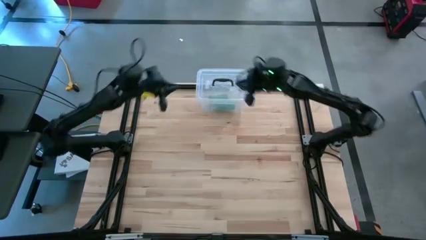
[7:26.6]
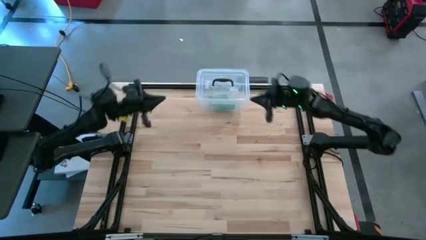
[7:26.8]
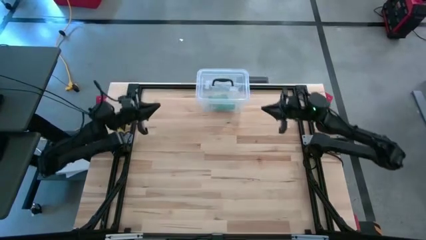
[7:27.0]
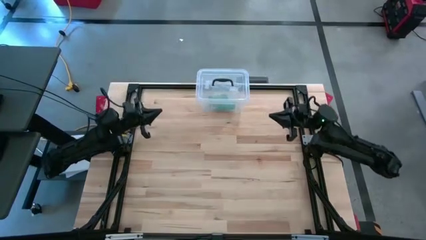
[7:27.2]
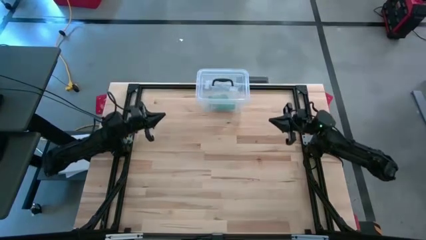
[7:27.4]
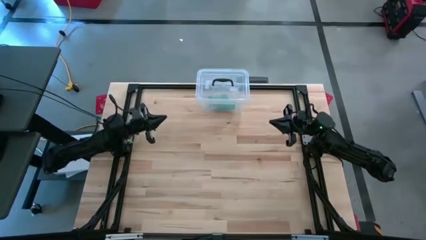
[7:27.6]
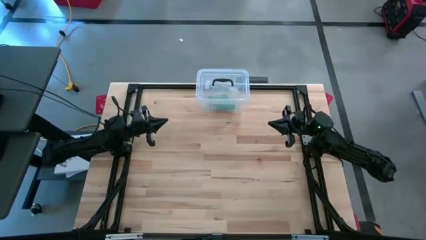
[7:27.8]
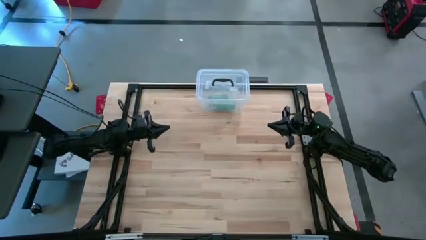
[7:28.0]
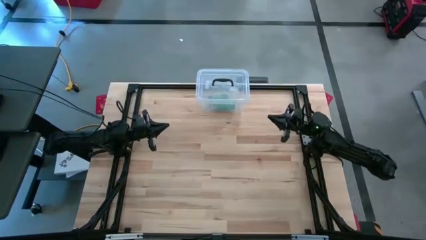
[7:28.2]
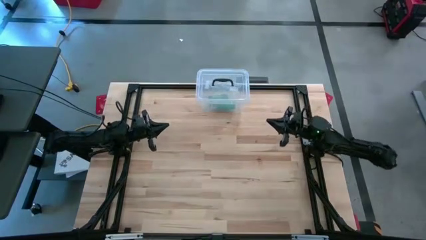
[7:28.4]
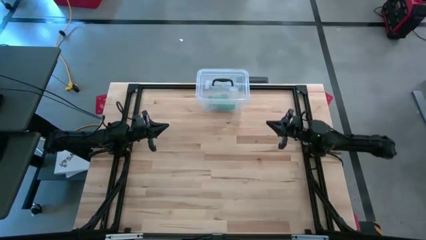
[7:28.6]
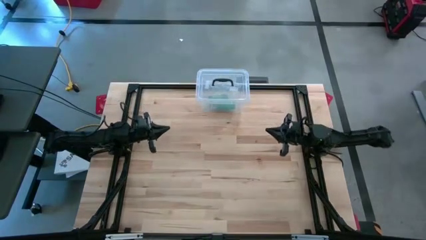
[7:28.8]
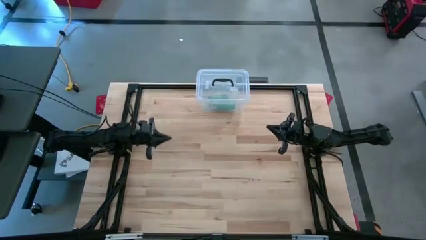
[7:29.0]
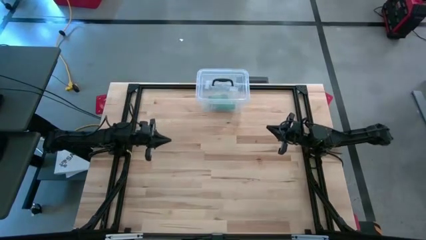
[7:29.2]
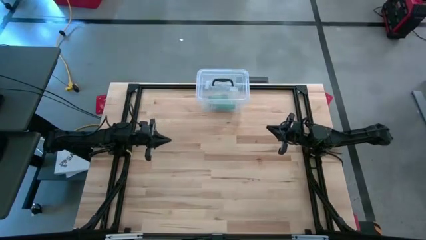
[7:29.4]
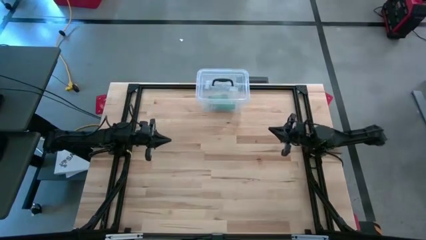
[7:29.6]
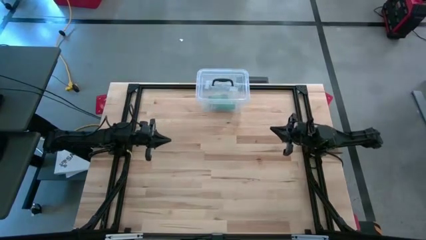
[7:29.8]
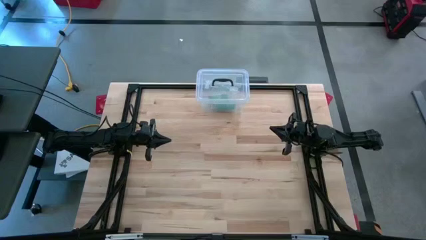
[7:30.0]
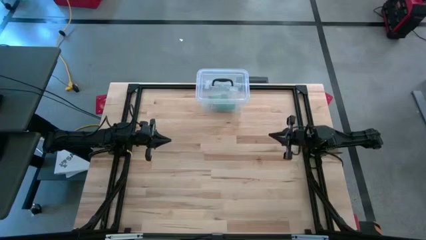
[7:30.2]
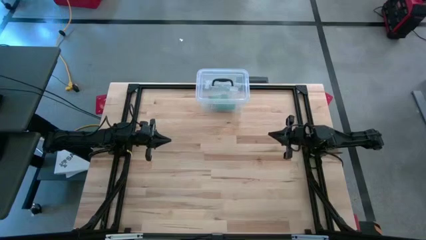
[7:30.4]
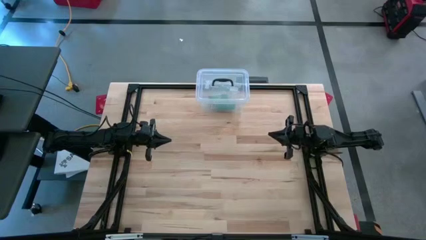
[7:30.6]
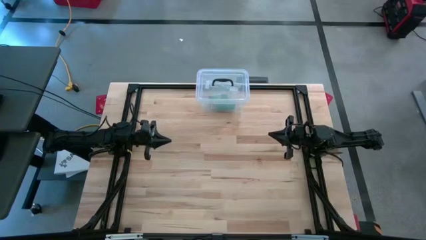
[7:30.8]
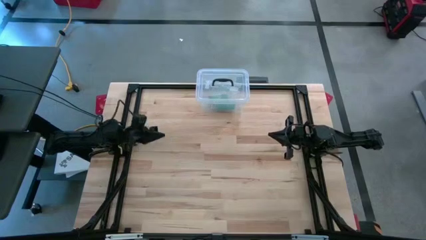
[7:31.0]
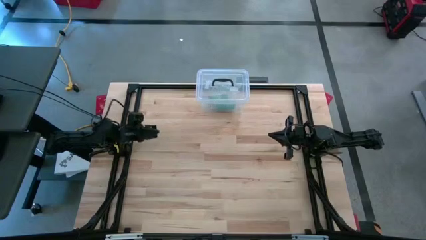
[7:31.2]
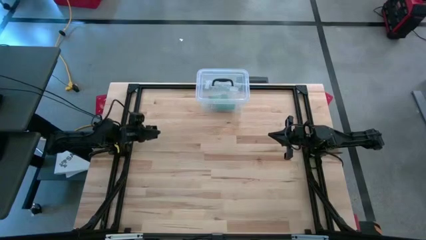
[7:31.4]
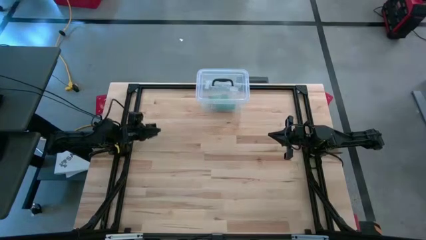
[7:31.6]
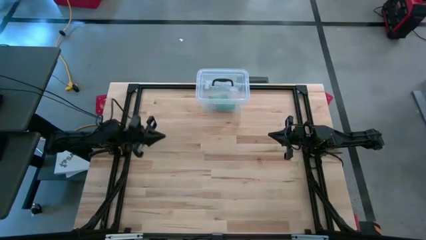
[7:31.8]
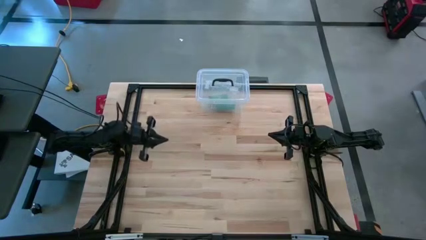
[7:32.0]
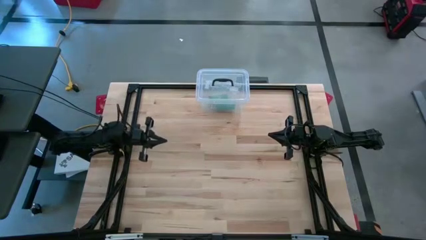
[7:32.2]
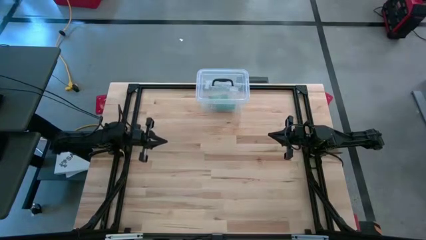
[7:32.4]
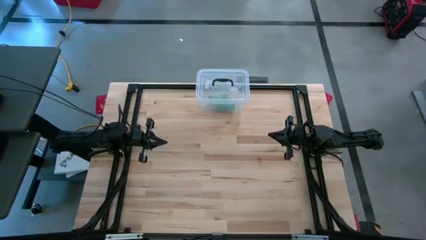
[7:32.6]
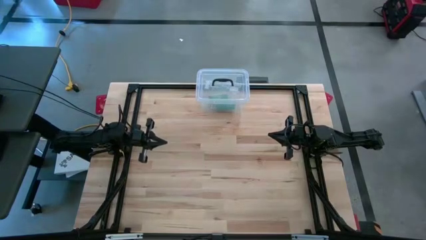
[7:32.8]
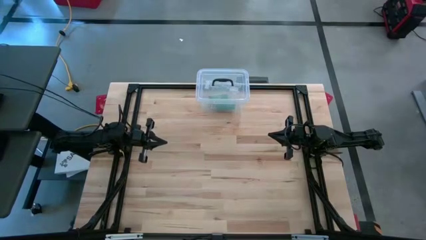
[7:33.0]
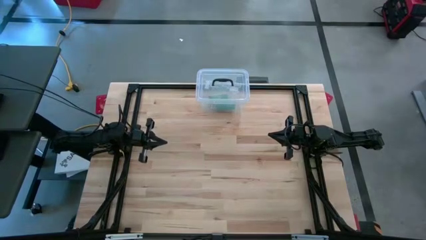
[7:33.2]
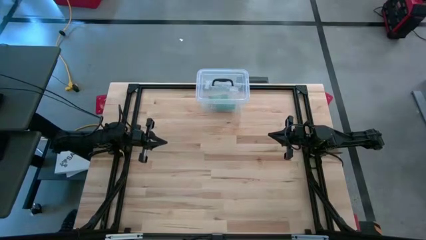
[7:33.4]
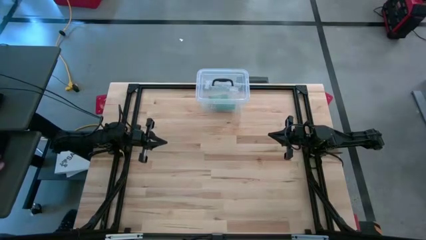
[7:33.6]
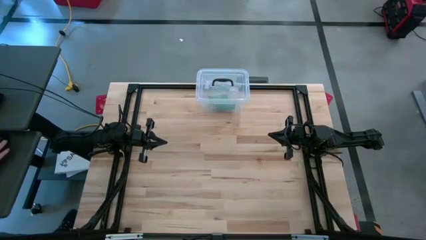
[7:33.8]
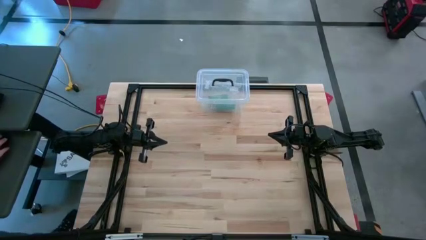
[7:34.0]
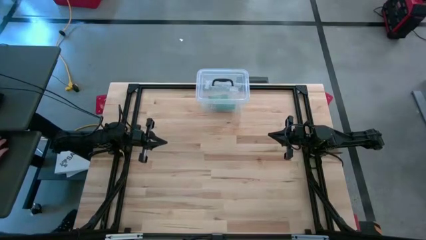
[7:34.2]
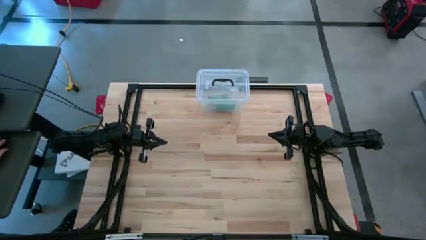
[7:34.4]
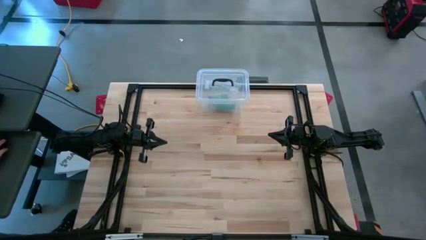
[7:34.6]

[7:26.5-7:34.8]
Task: Roll bandage
Return to Home Position

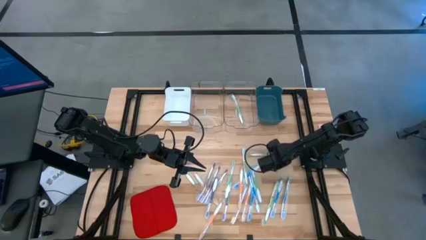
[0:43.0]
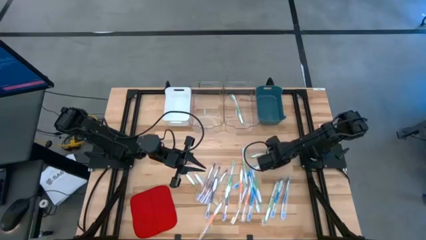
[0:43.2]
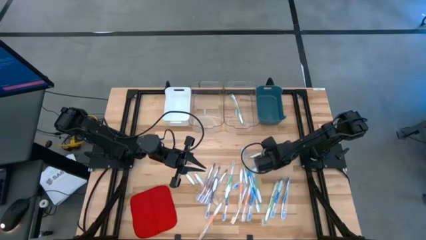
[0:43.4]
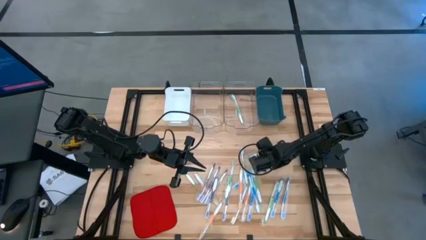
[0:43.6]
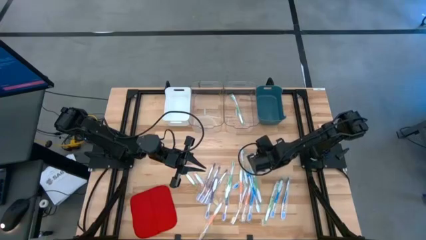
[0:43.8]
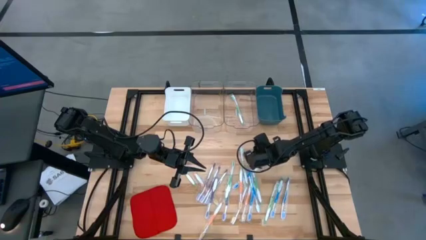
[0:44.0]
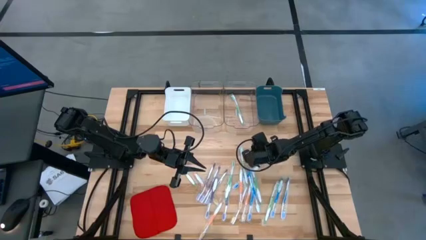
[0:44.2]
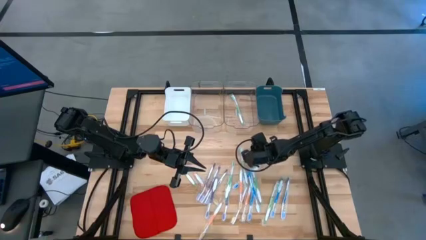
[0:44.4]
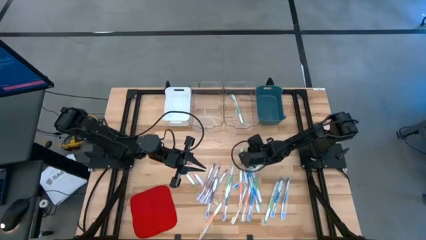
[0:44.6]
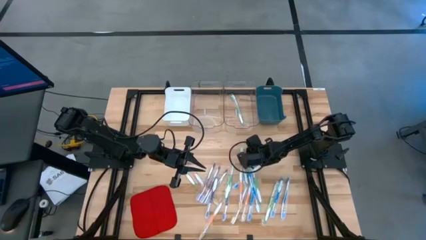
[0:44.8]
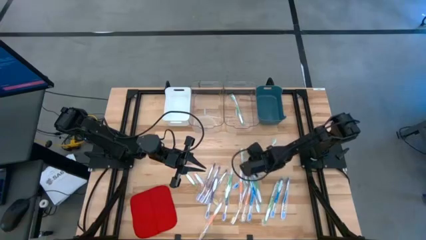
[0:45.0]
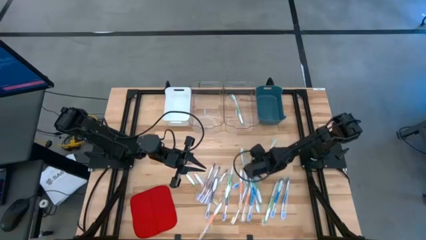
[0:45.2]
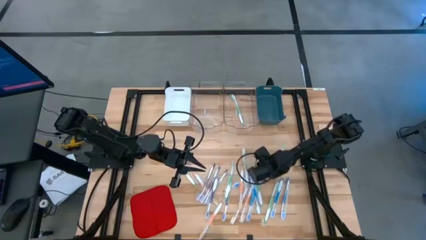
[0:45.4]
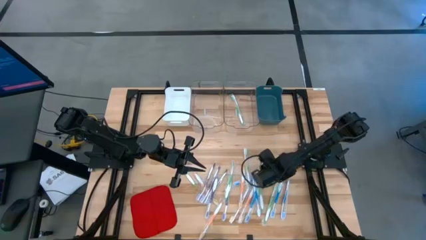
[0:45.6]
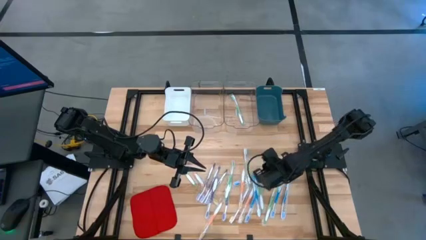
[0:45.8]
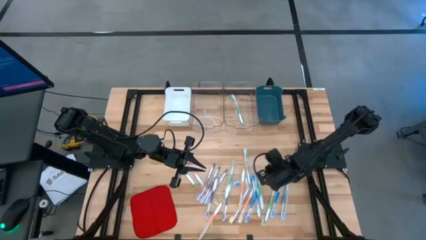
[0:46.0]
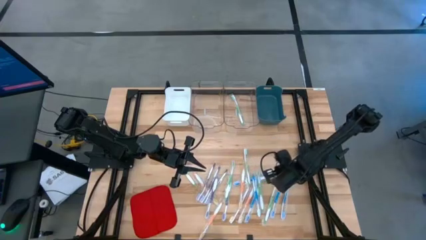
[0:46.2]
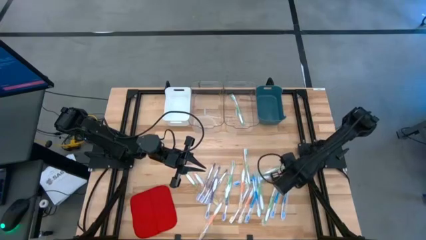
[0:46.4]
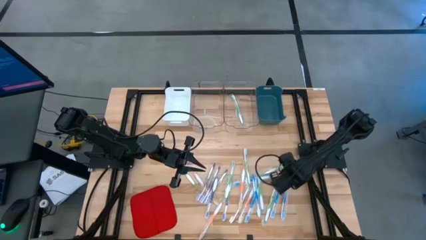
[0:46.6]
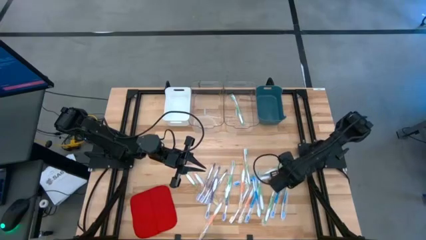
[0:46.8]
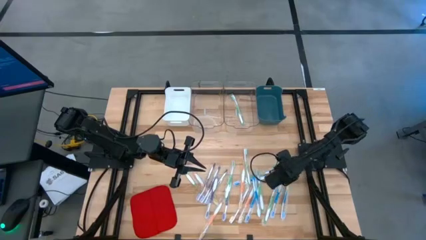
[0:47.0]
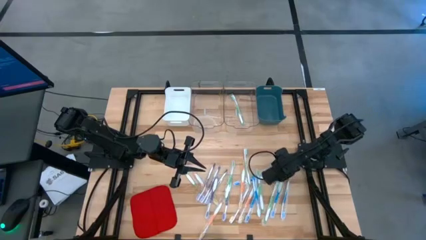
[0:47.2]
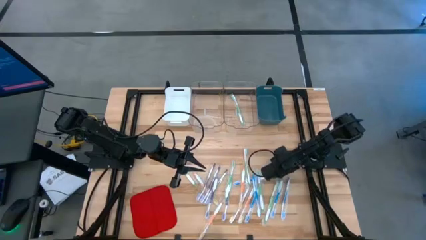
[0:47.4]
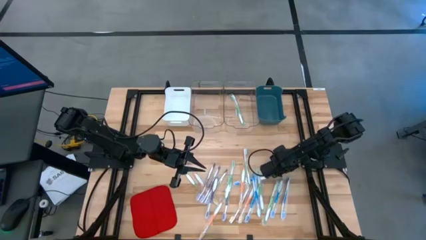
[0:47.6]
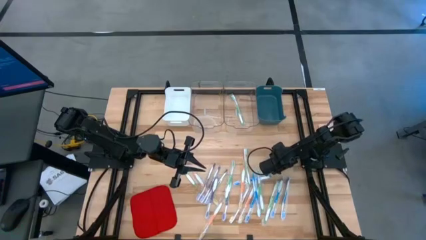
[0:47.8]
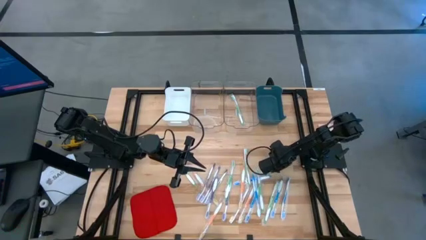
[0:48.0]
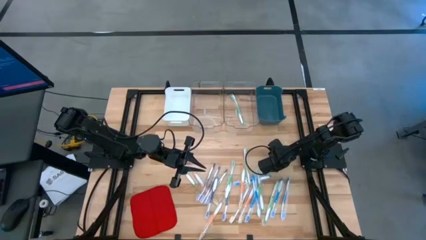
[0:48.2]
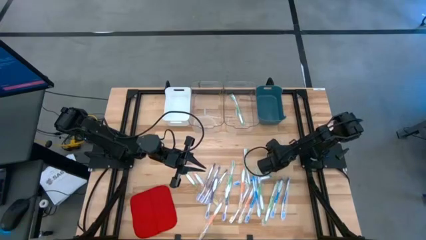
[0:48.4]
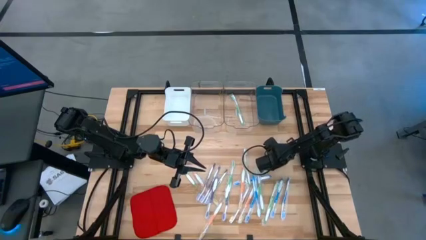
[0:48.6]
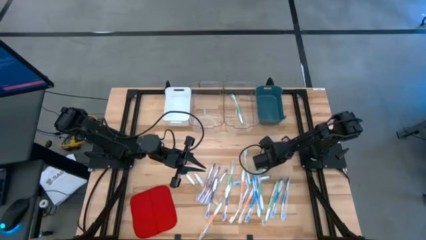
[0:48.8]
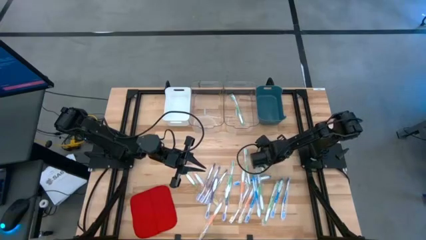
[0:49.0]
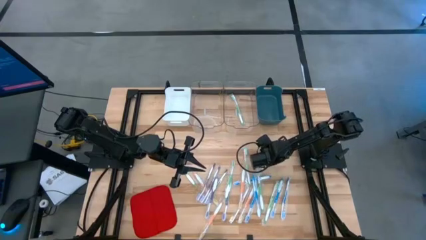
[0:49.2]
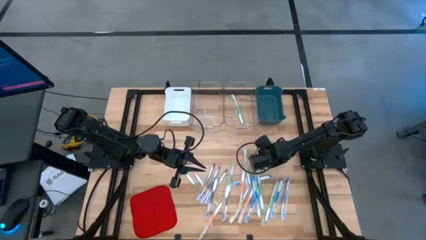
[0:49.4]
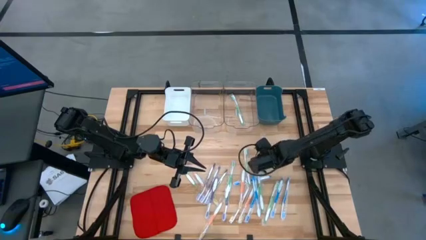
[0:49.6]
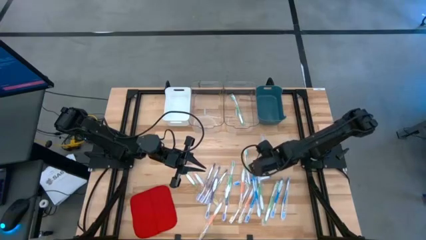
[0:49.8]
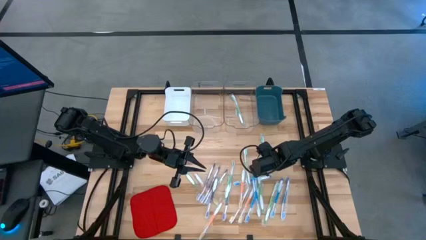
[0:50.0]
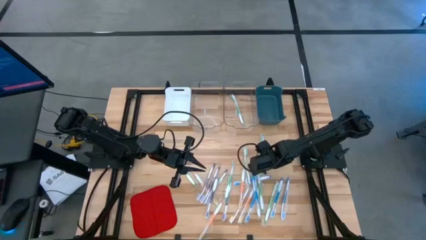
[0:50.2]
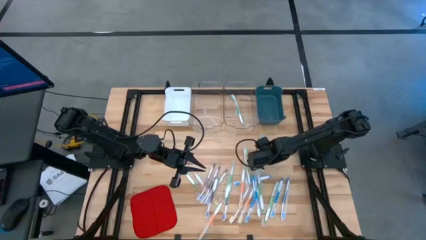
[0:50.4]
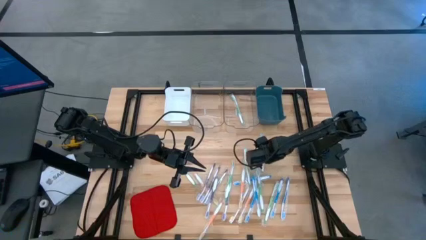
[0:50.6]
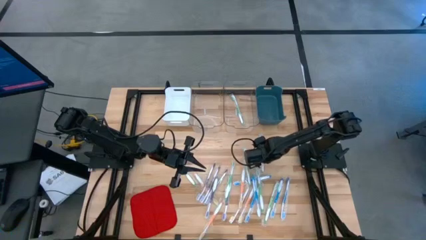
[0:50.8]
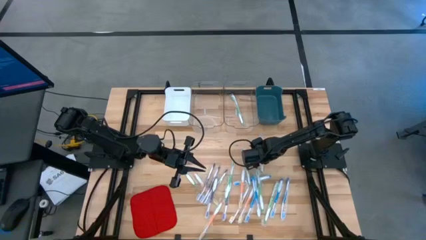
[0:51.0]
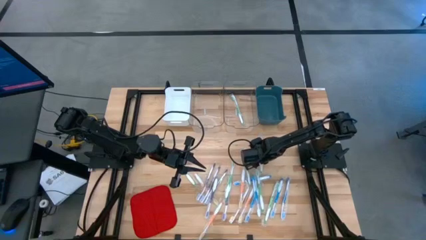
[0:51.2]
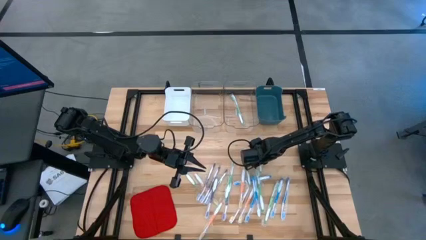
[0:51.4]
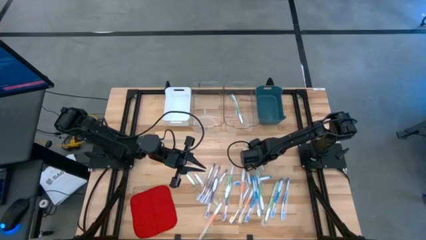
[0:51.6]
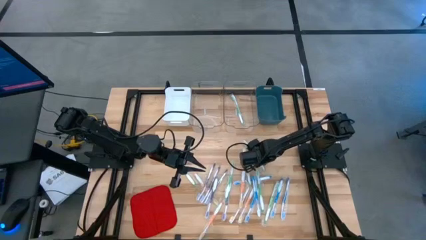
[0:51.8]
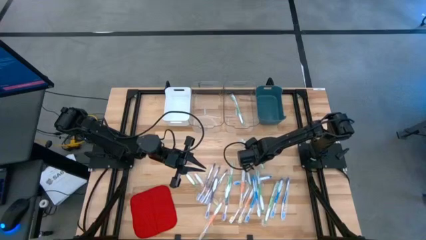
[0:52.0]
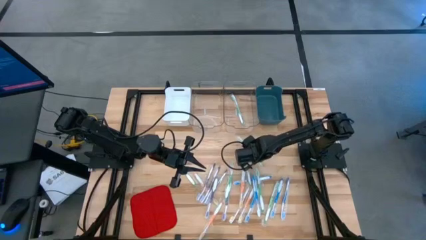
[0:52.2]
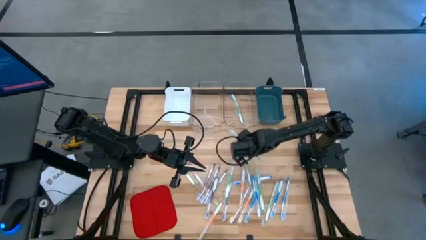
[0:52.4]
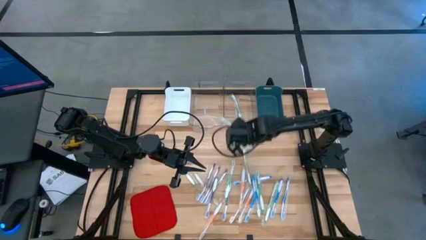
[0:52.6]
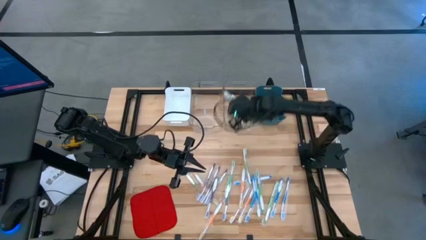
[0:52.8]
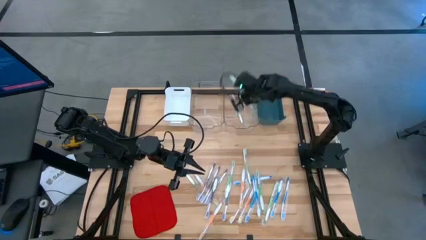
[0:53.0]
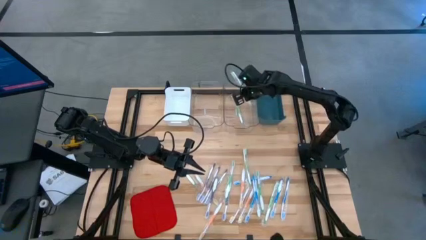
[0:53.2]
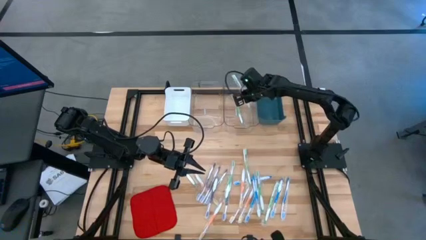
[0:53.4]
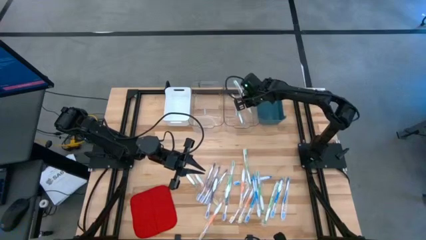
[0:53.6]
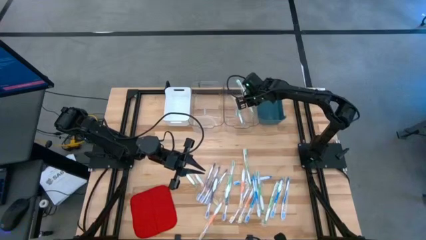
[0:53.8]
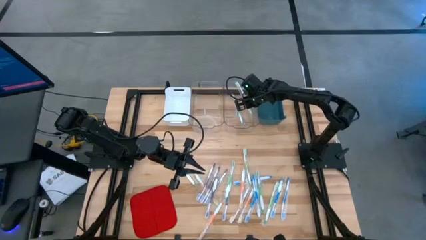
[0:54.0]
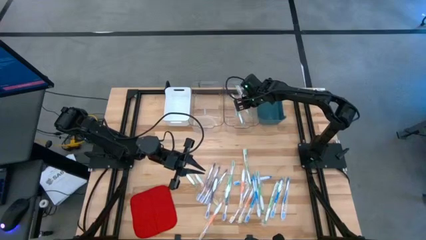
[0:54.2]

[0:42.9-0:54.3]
Task: Pick & Place Toothbrushes
Put the green tooth brush into the right transparent bin
